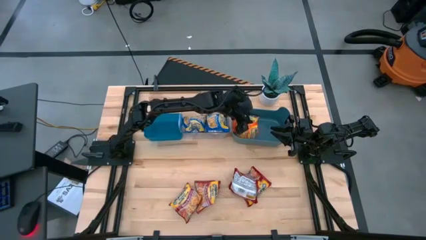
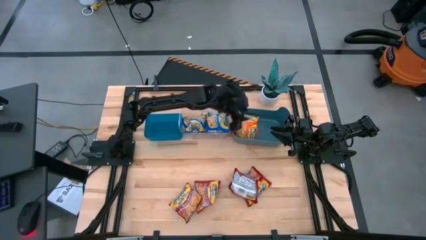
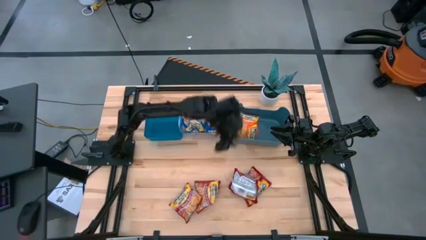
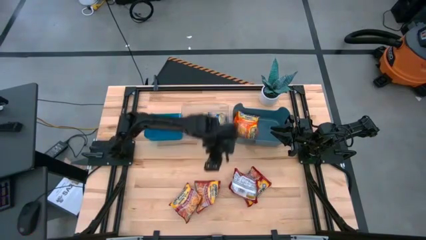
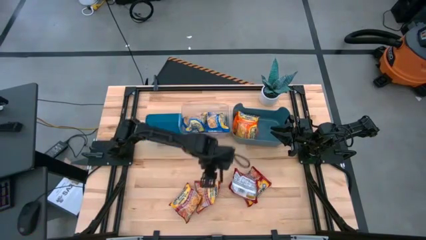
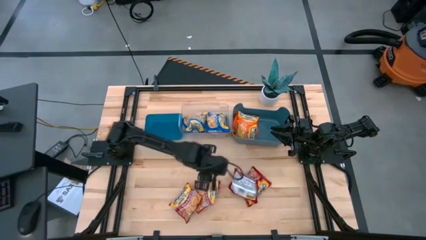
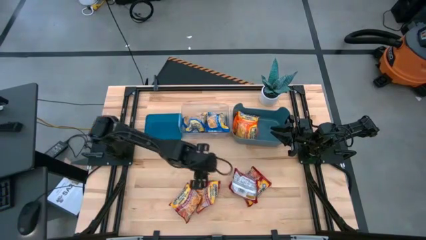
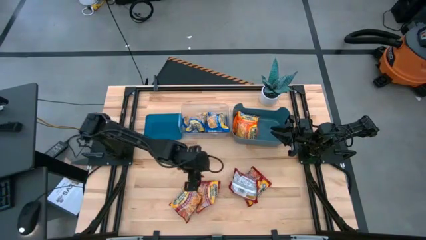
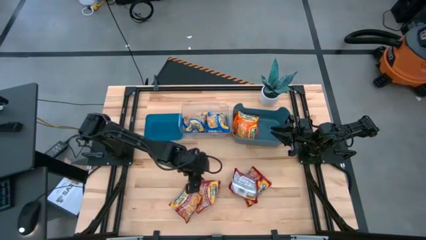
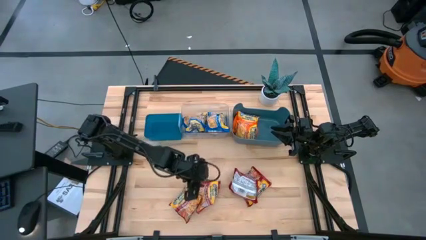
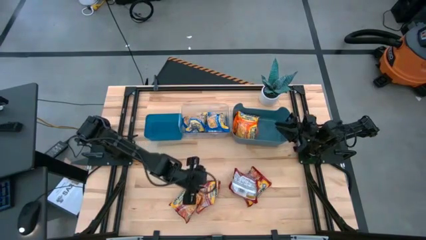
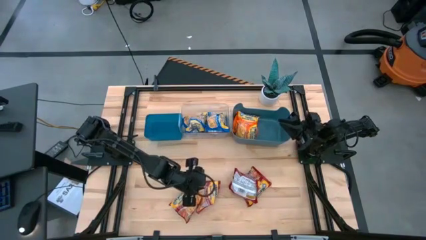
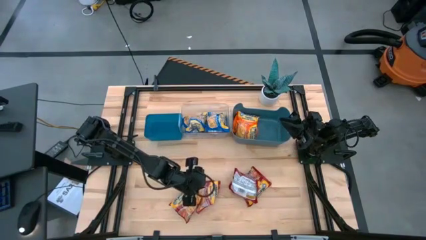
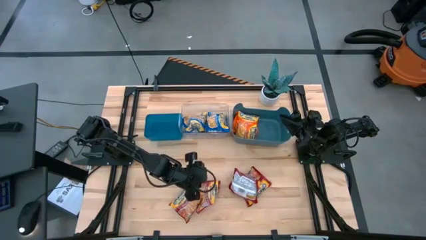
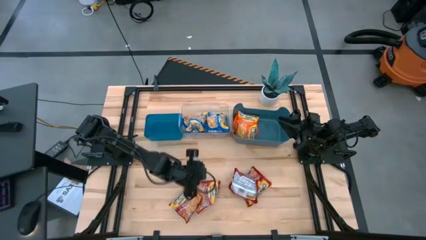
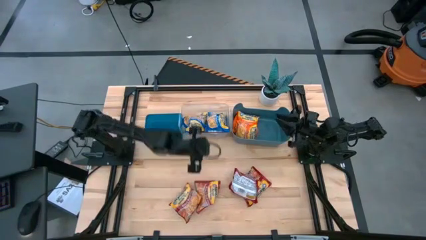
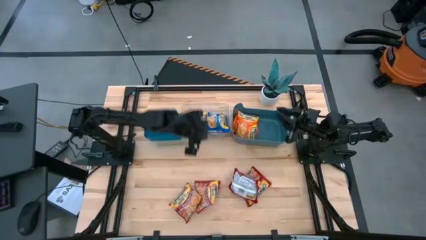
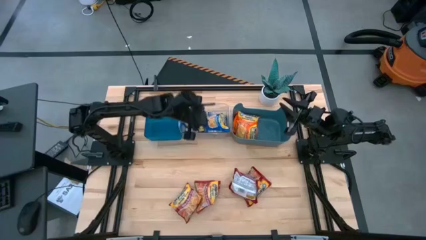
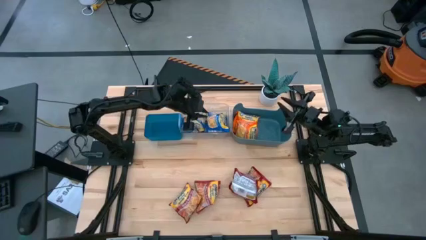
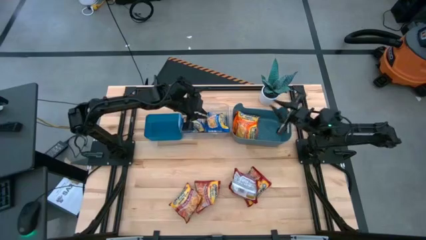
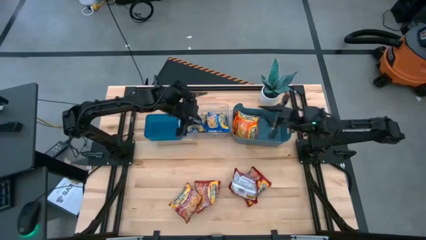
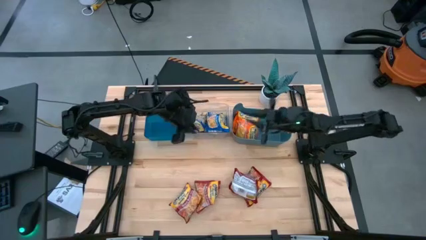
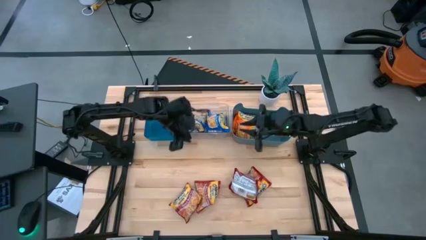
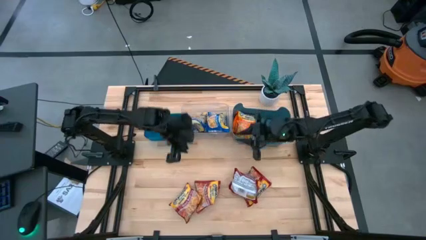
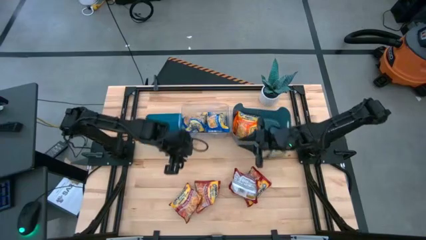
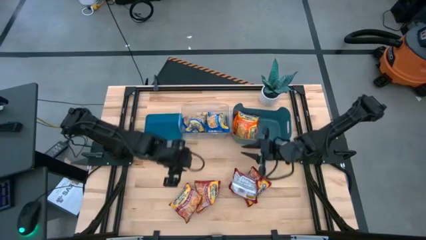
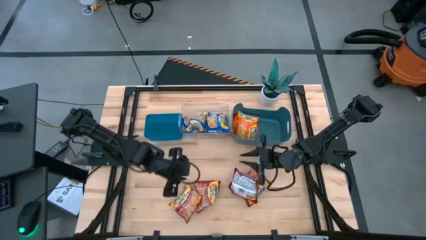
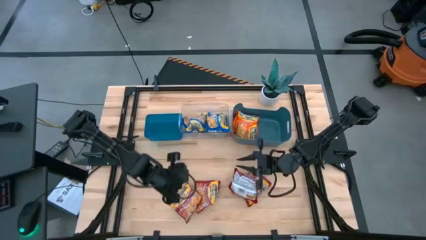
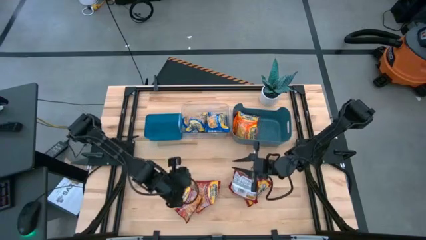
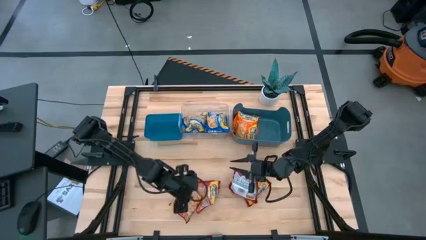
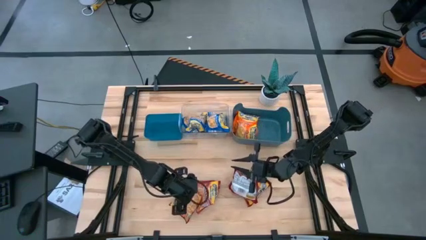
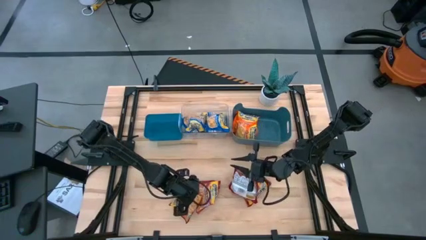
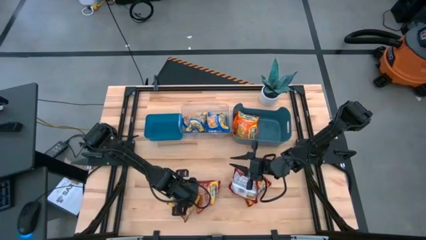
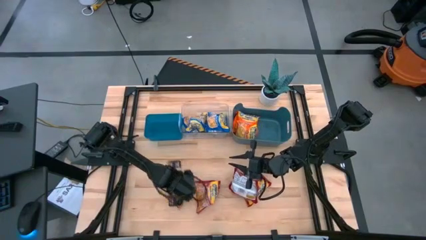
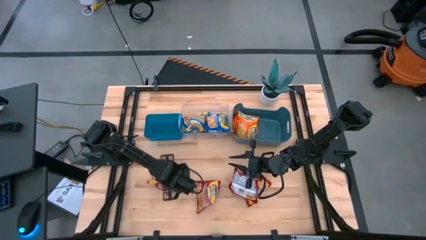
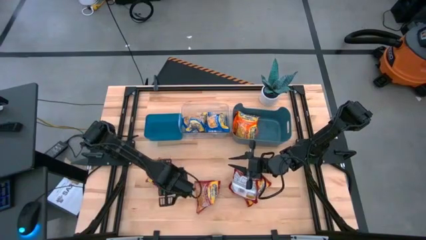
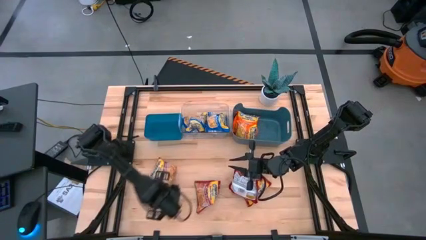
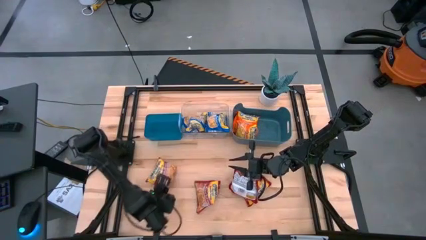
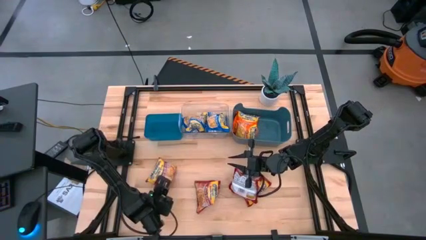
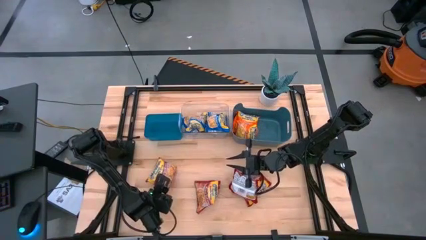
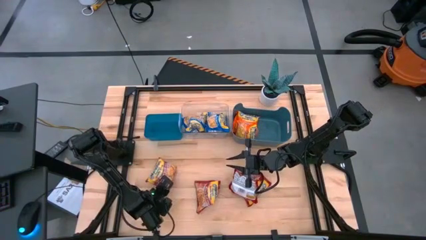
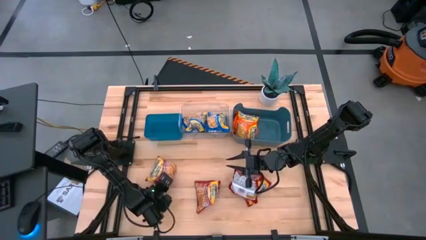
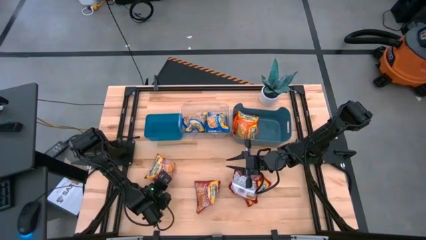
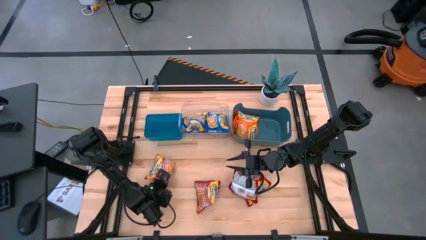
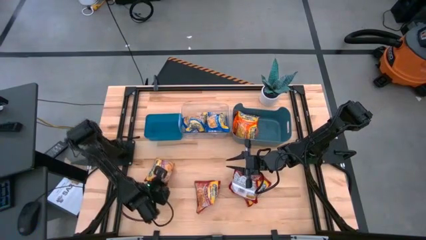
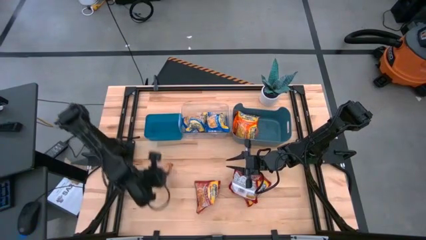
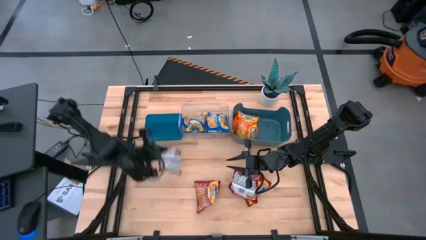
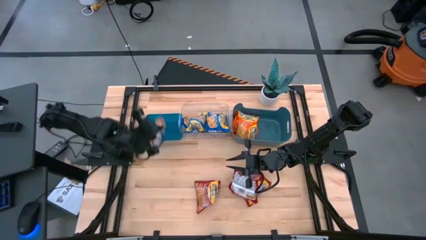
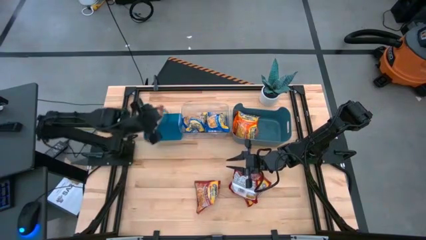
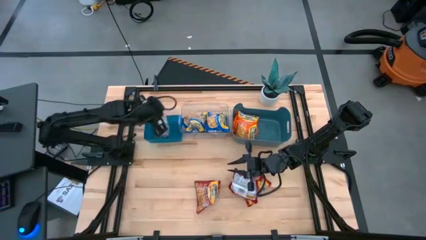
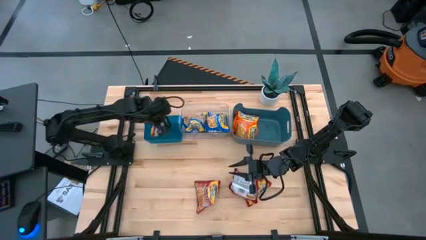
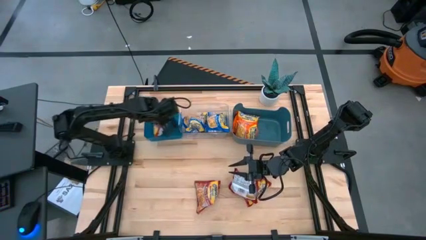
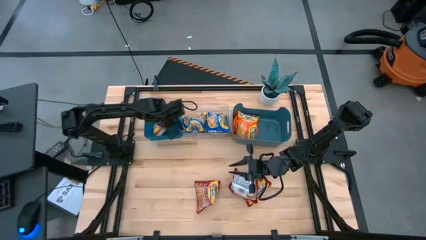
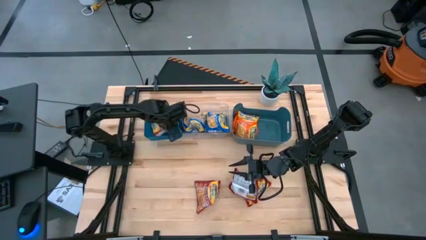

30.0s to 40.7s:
Task: Sort Maruchan noodles
Put the red noodle pack into the left blue bin

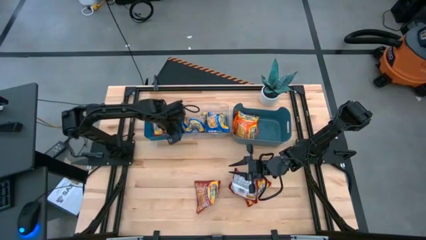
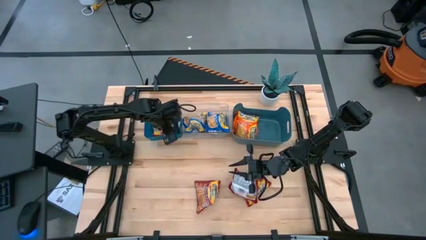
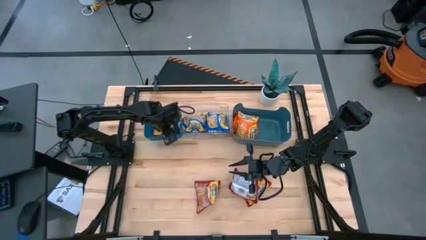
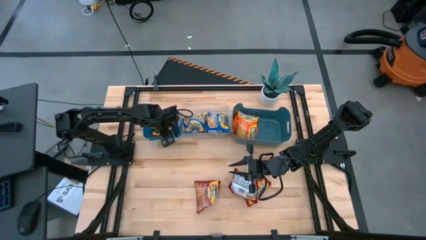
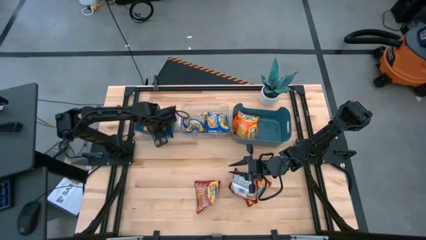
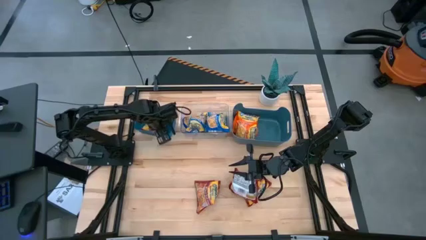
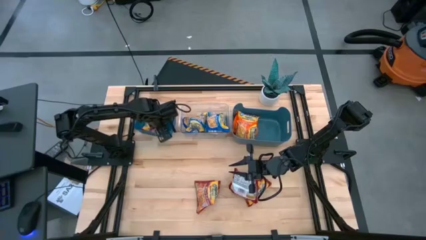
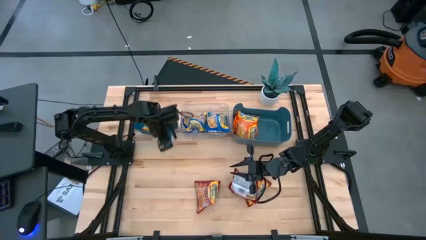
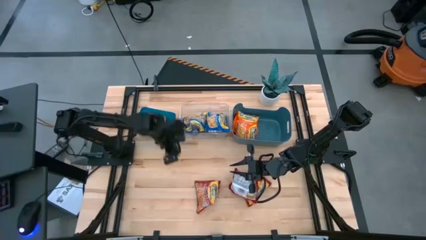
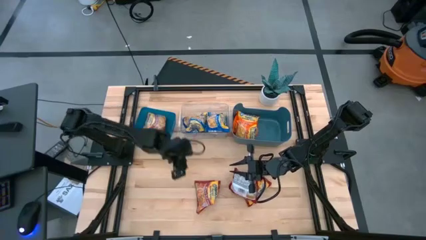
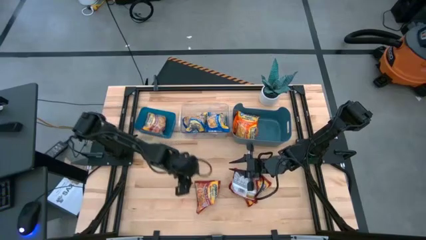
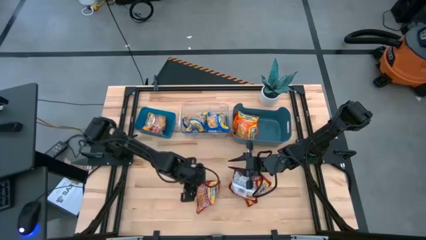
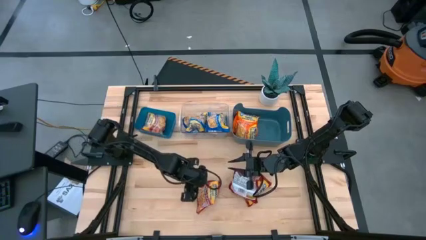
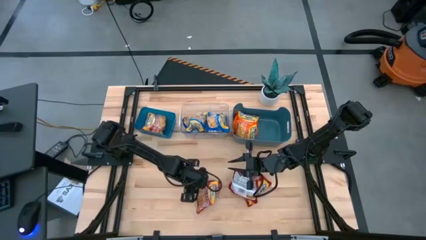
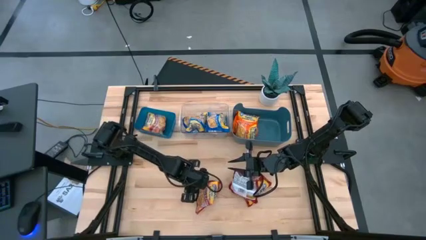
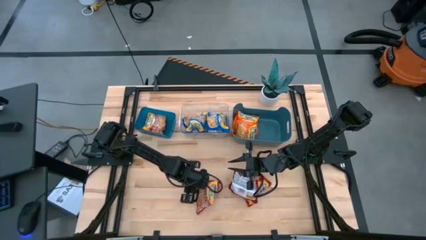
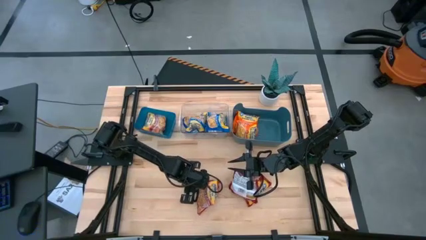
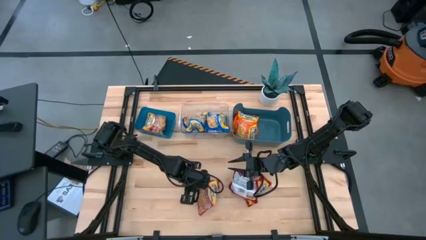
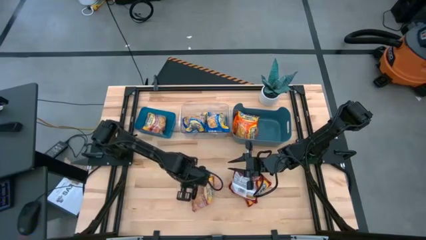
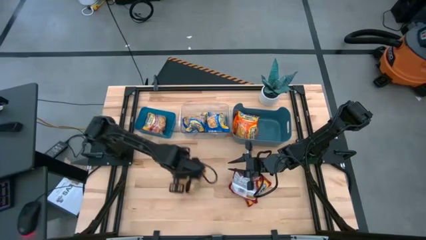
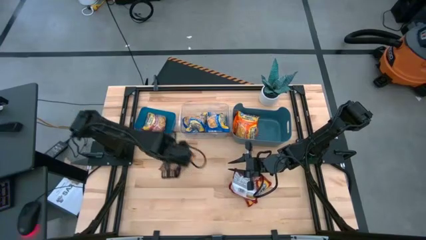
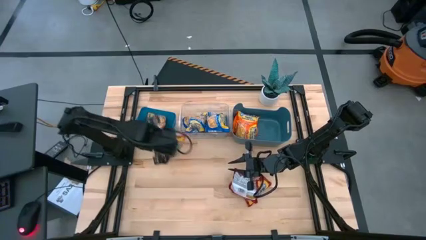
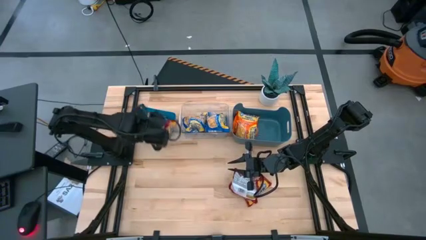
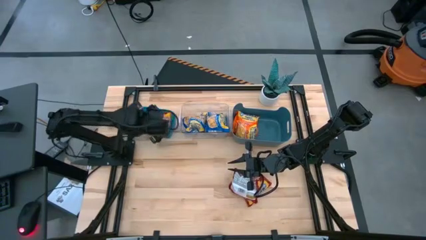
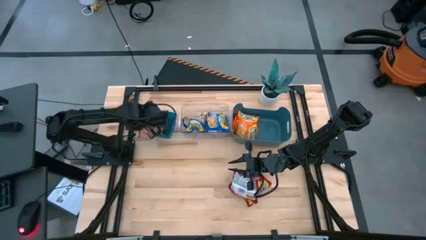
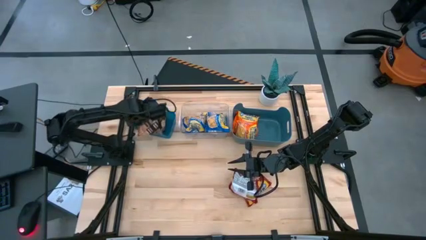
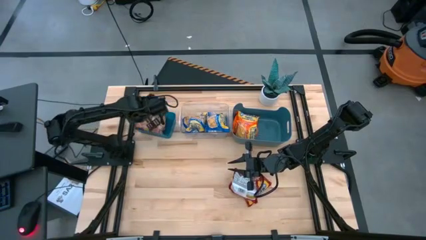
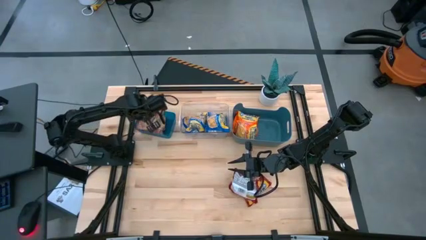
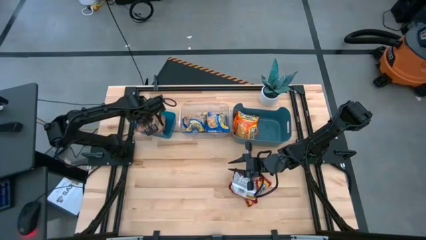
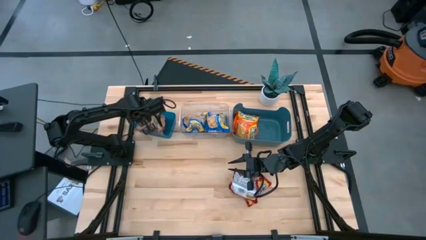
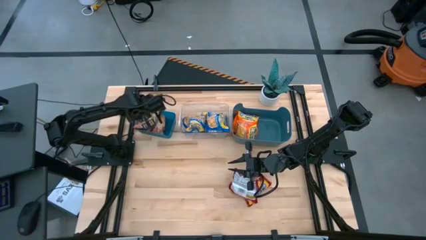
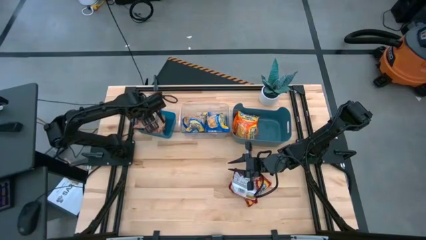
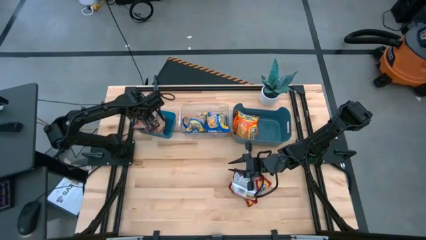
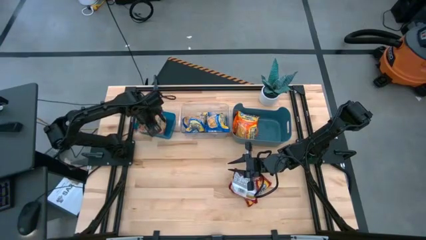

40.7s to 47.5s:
Put the red noodle pack into the left blue bin
